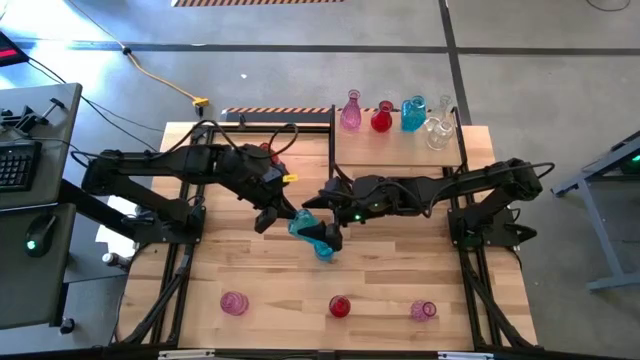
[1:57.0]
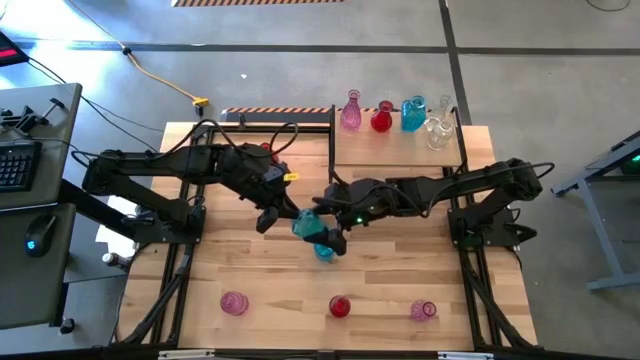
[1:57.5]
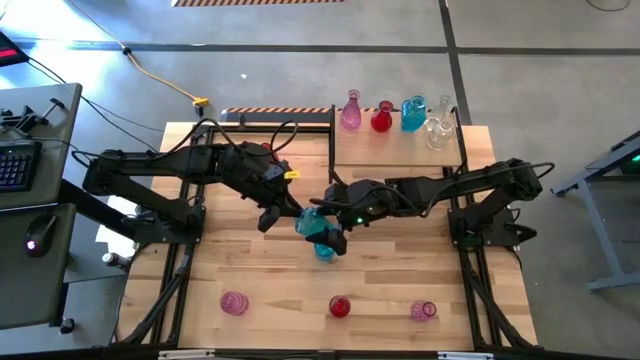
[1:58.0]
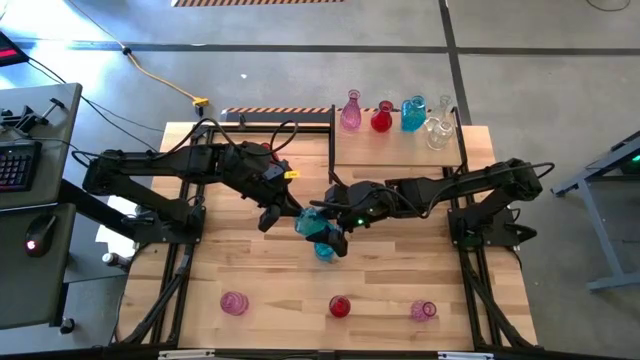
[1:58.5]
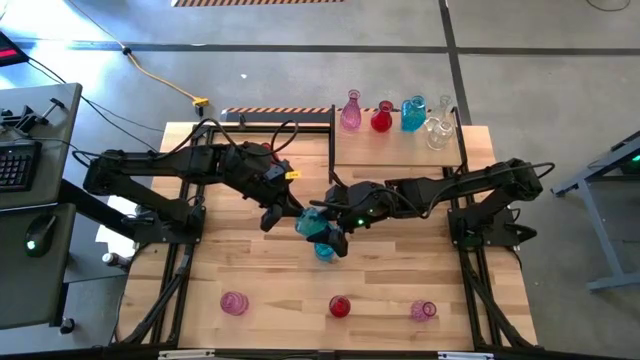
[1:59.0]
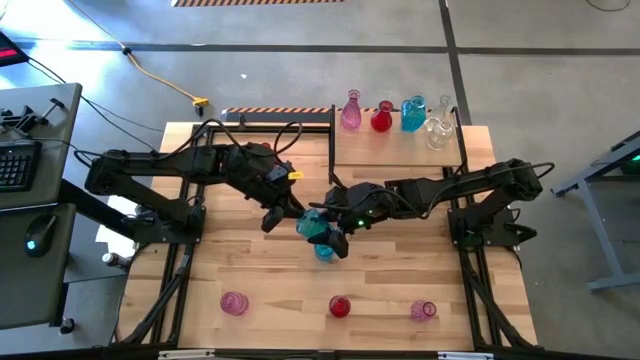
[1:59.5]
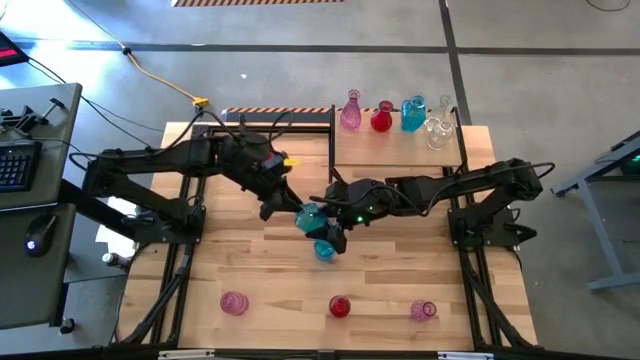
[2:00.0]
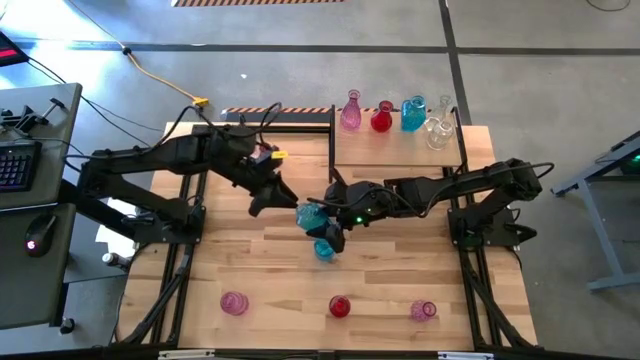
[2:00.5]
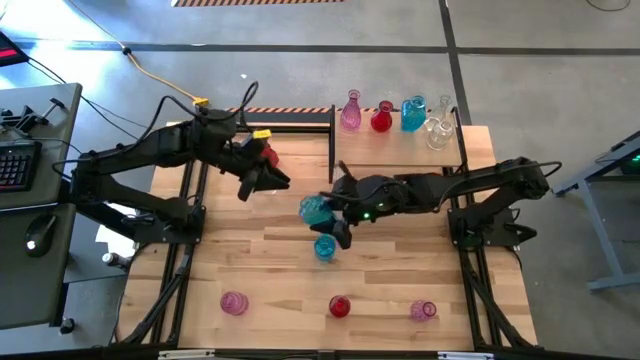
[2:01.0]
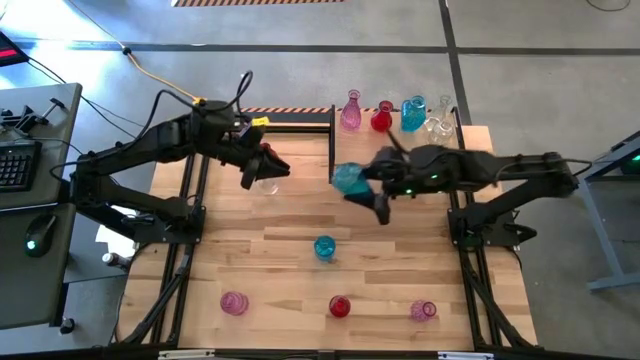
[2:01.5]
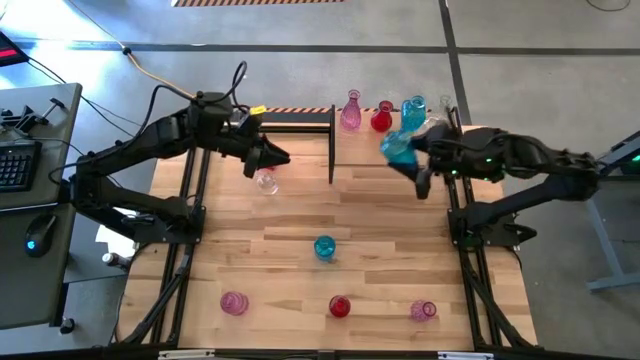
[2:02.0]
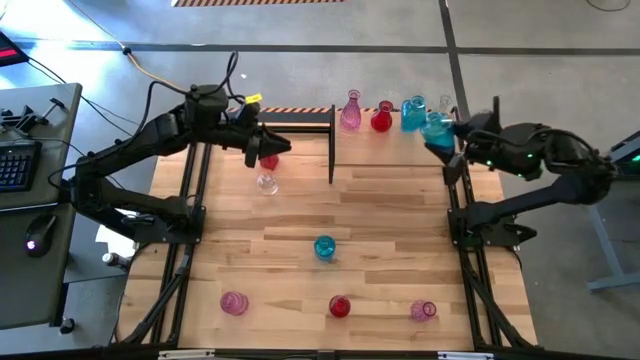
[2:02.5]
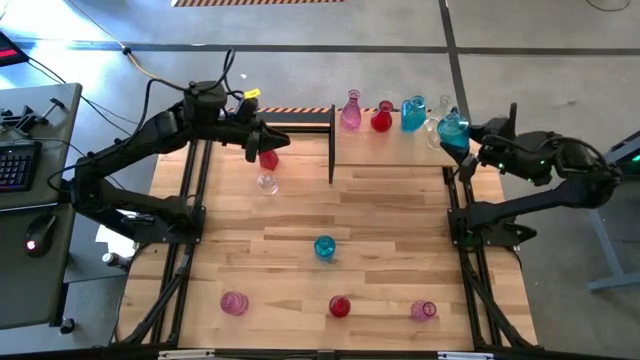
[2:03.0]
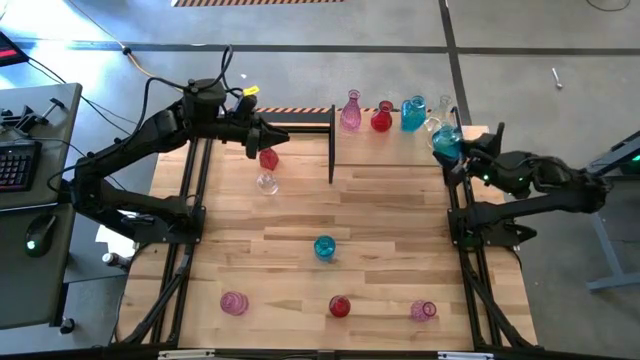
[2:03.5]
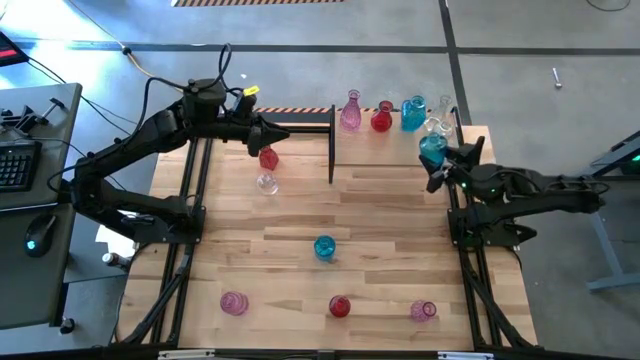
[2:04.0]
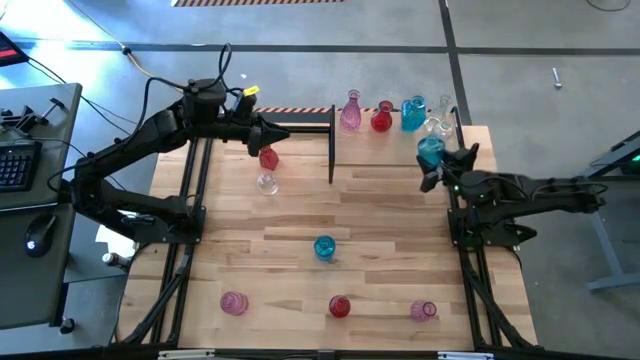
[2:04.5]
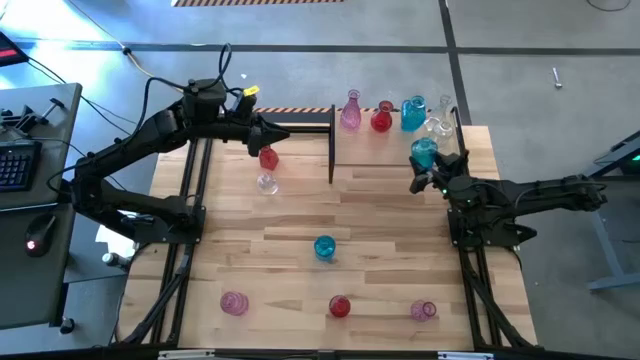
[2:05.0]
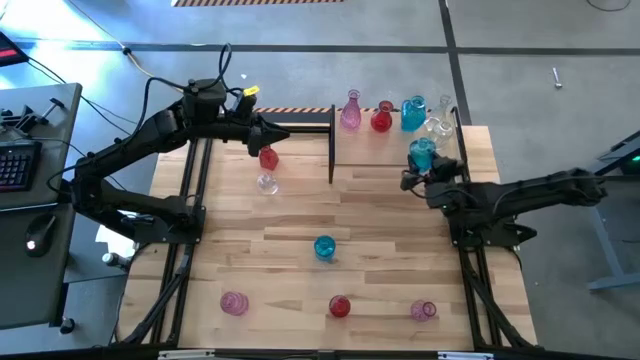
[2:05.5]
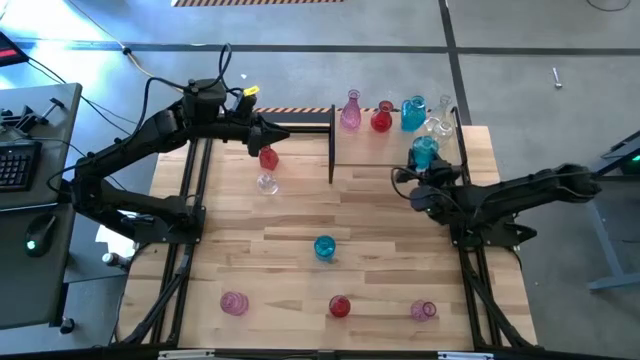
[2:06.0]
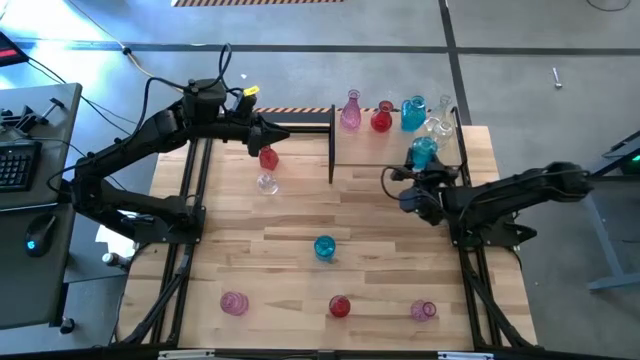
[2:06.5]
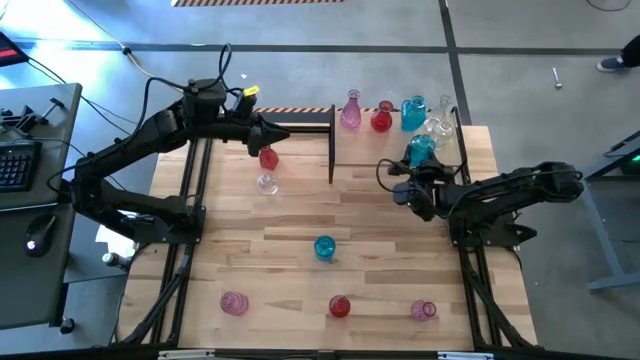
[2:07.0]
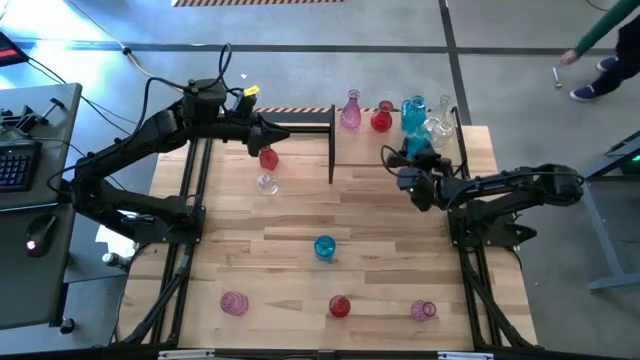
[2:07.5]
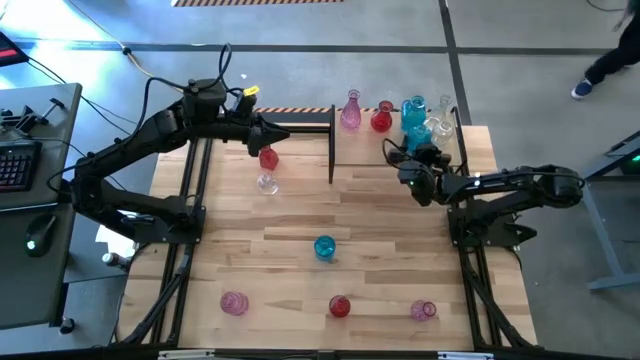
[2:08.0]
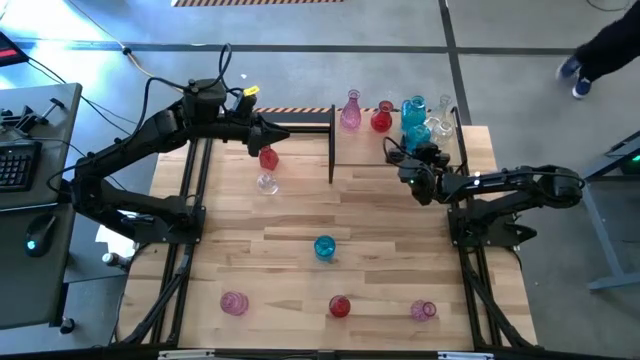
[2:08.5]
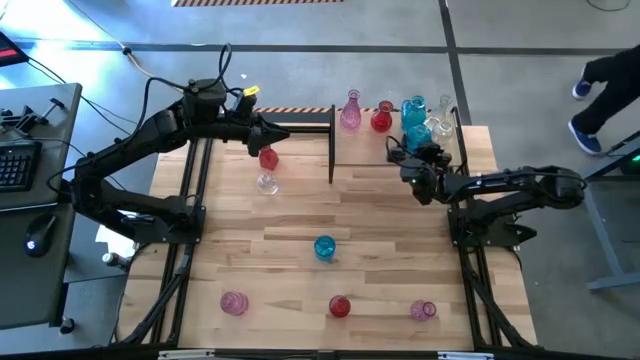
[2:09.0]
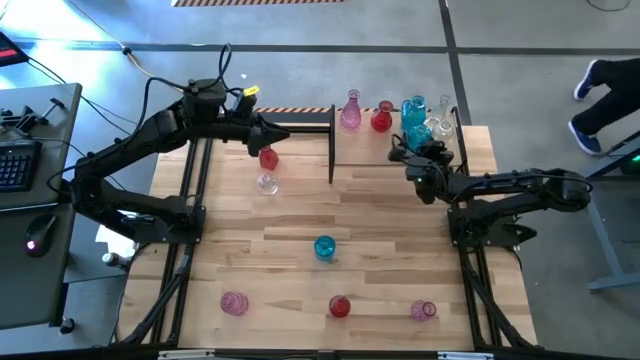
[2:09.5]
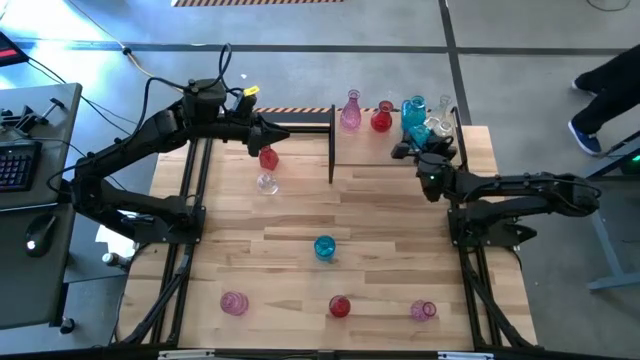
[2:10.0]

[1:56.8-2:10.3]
Task: sort vases onto shelf
Put the top blue vase on the shelf aligned with the blue vase

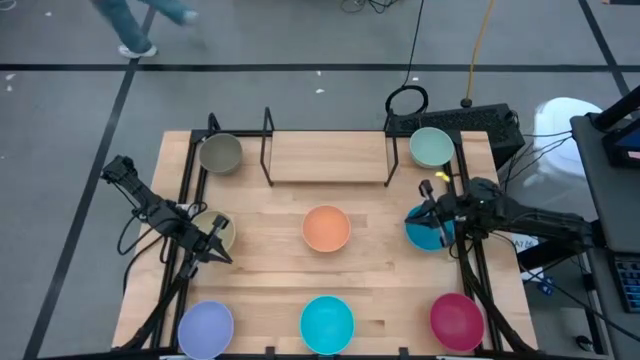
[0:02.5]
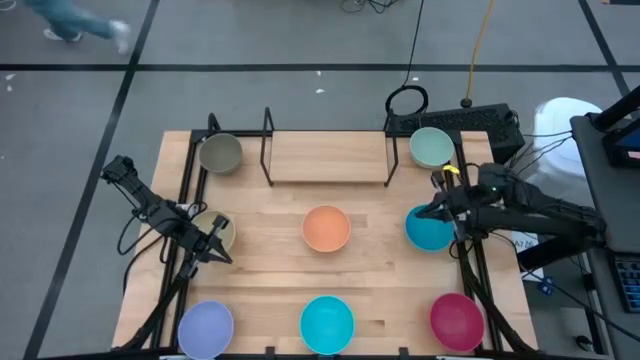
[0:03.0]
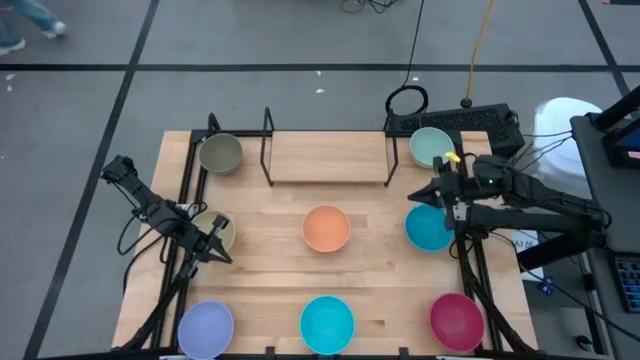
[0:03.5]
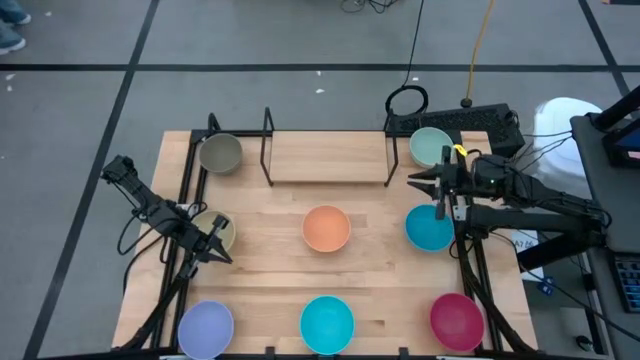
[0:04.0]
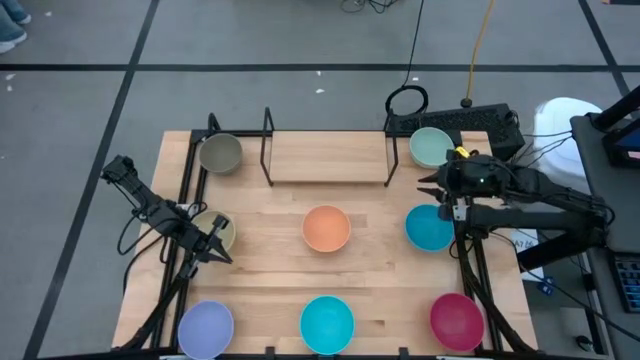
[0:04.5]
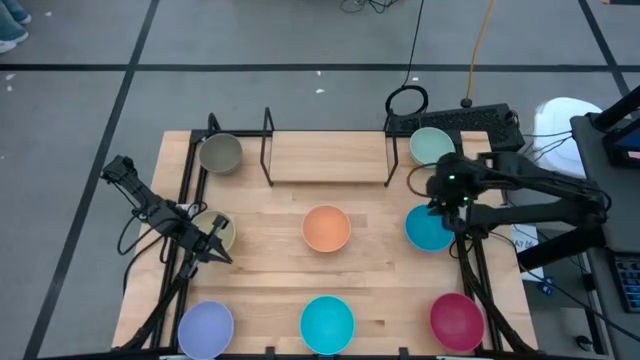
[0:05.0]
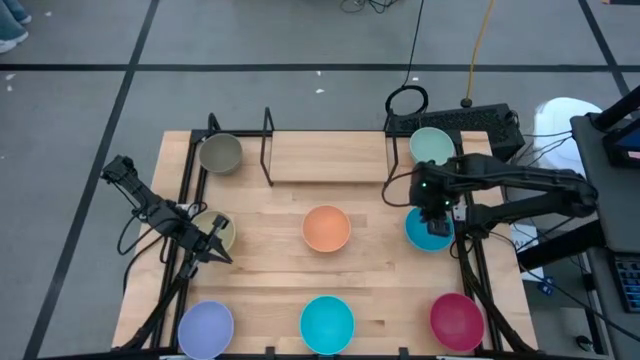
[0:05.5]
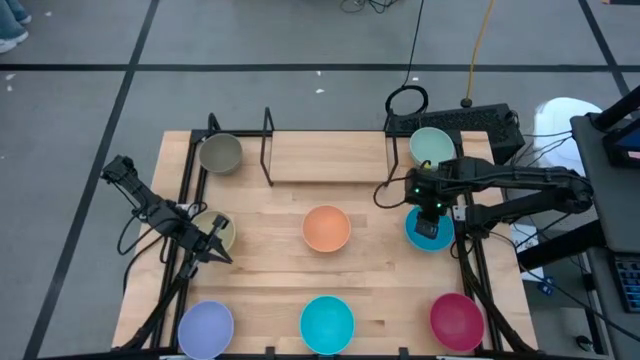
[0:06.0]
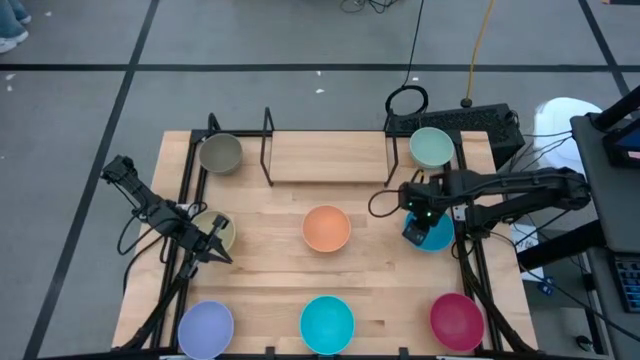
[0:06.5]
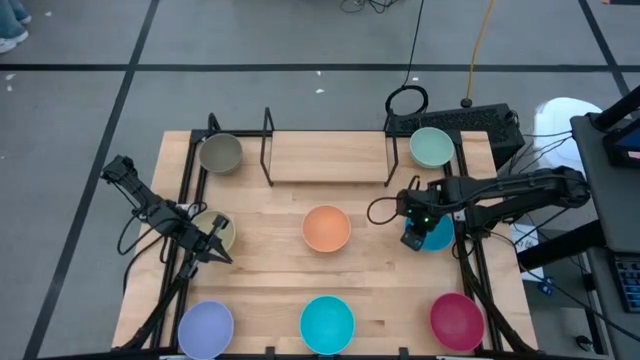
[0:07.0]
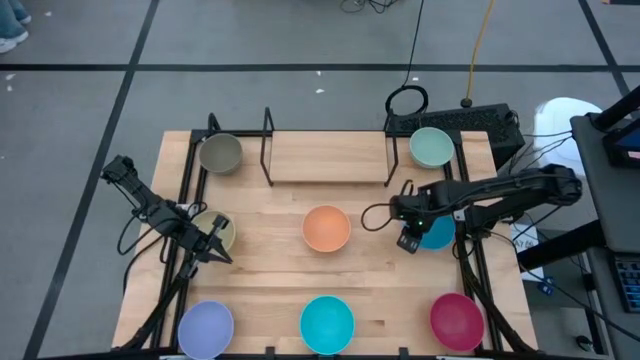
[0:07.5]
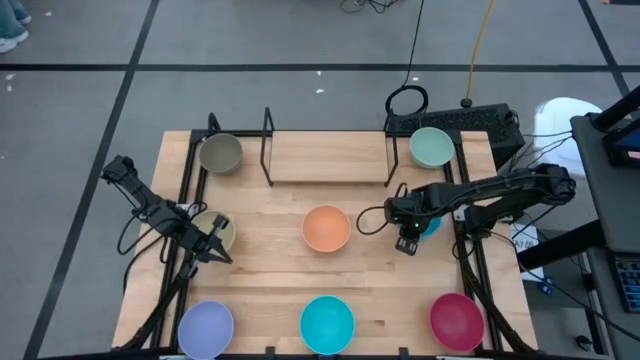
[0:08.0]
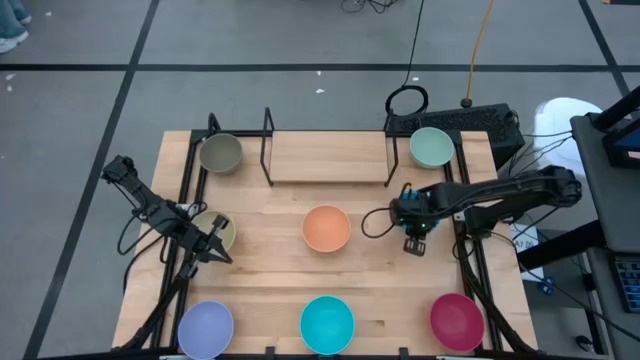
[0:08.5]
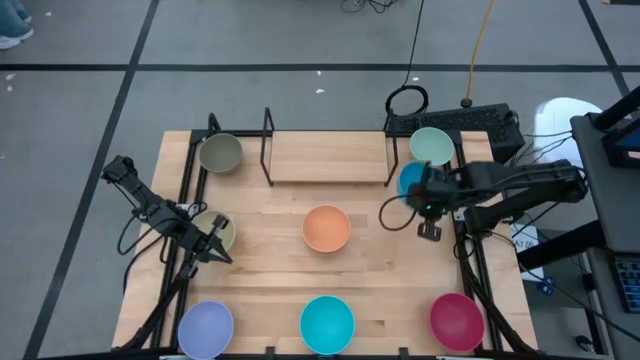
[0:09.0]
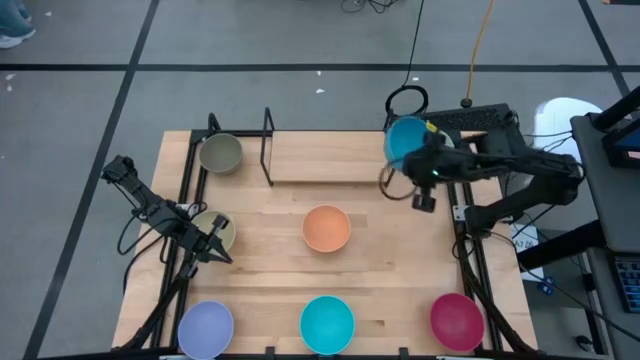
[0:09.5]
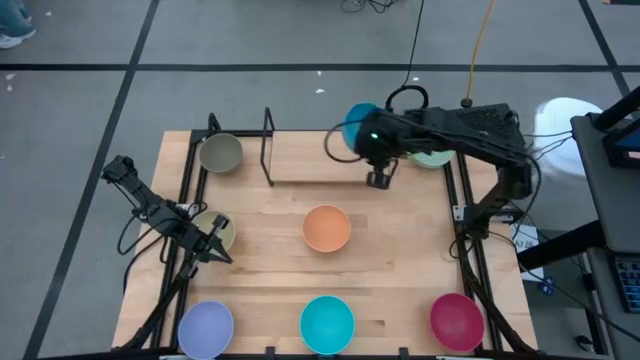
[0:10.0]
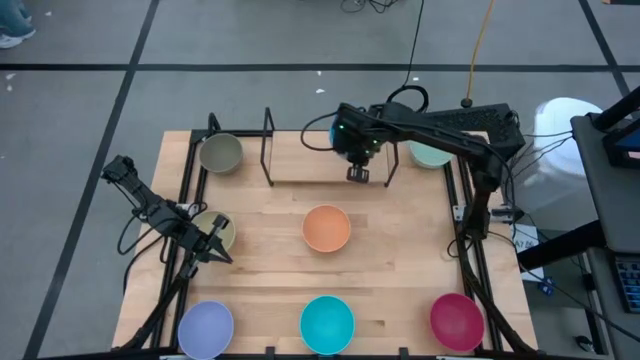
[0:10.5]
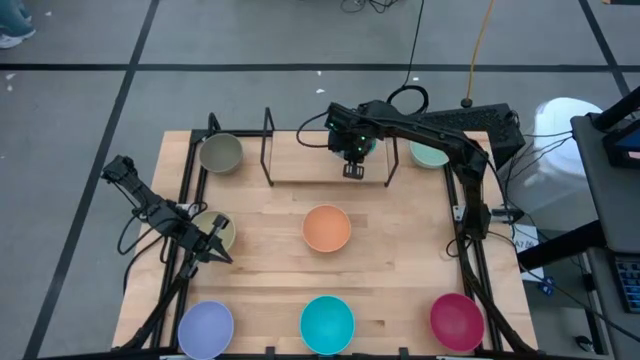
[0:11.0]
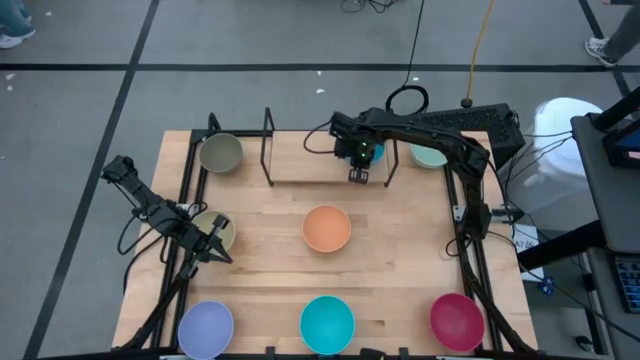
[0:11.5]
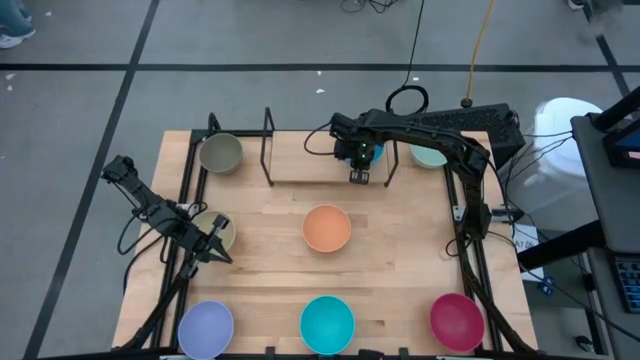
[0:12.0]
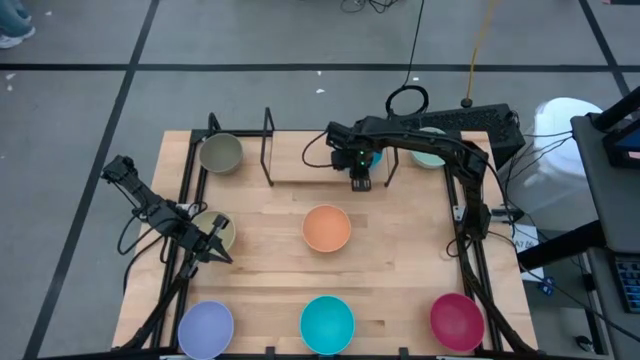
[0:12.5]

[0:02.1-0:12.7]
Task: Place and stack bowls onto a shelf
Put the blue bowl on the shelf
